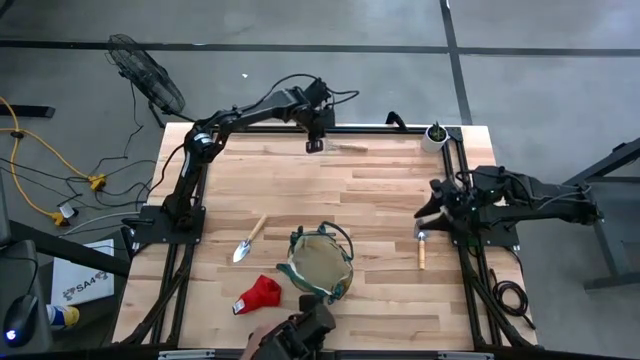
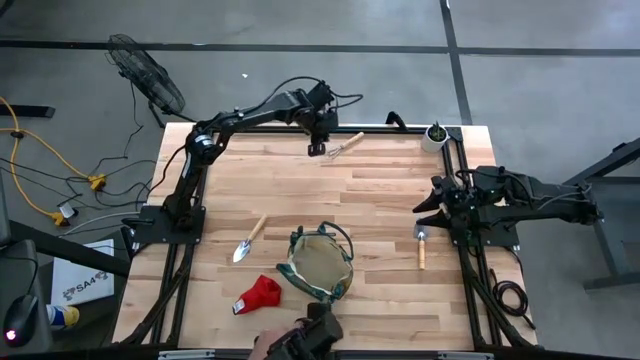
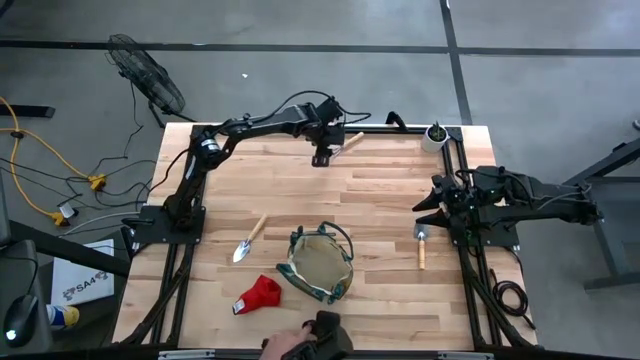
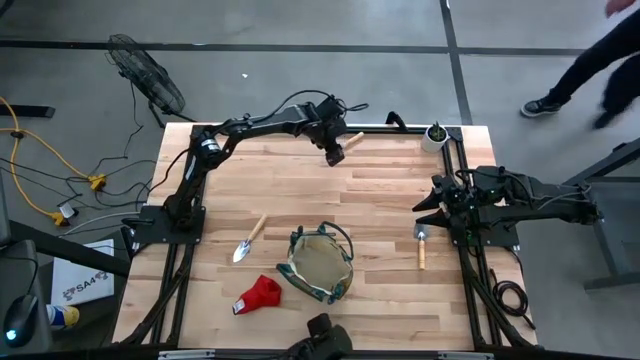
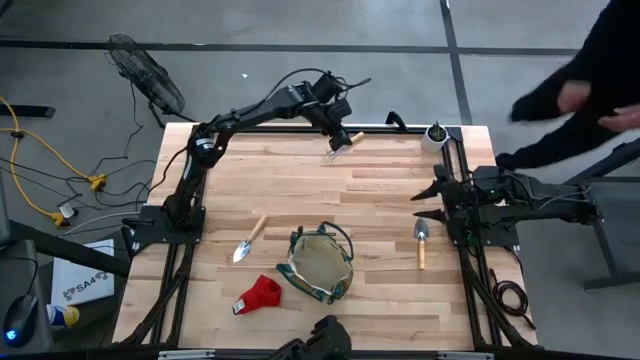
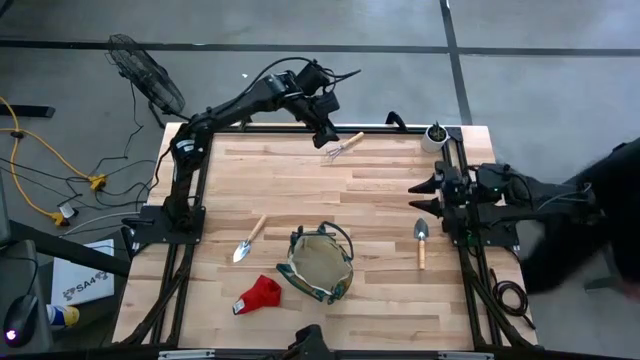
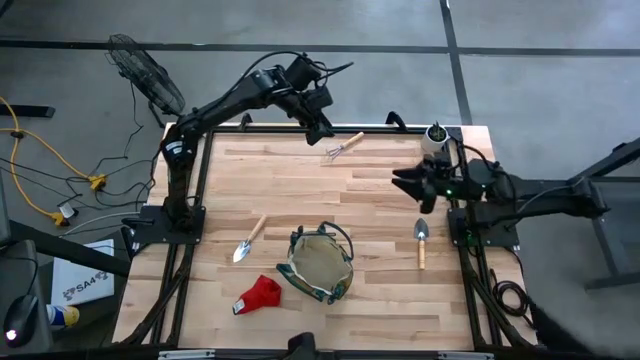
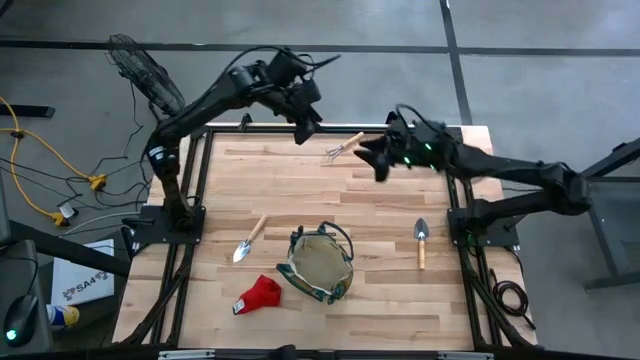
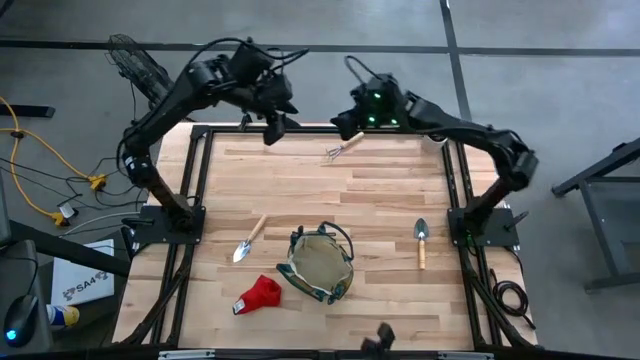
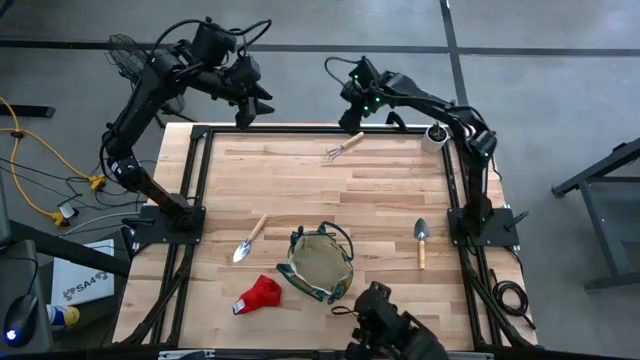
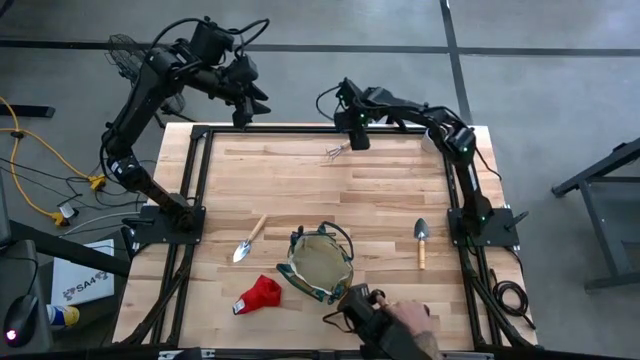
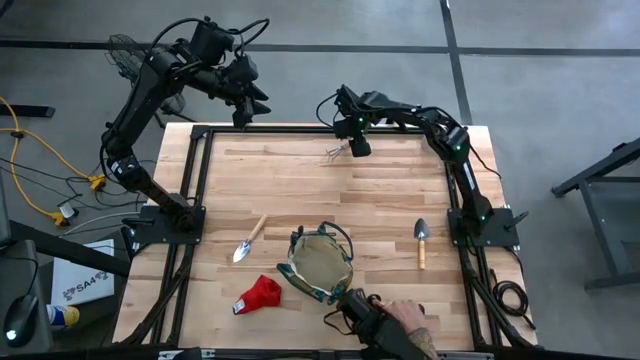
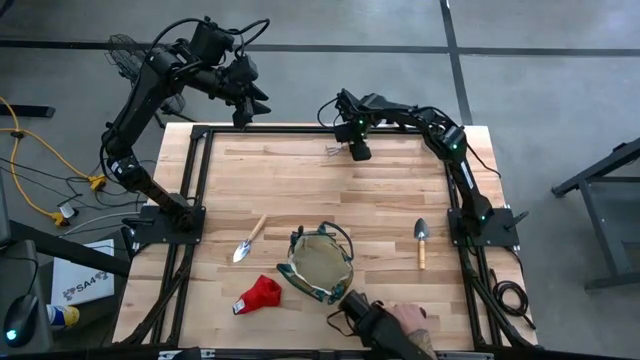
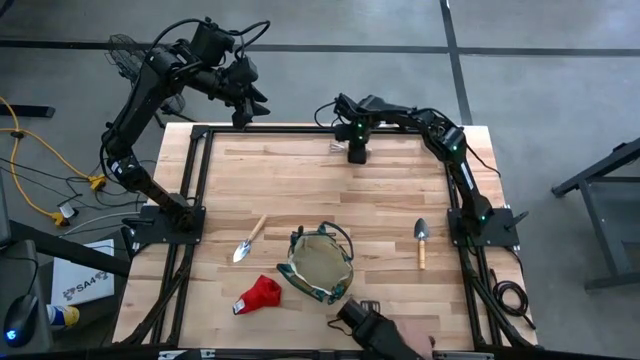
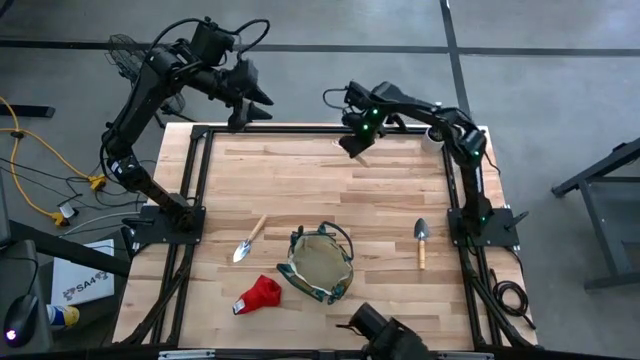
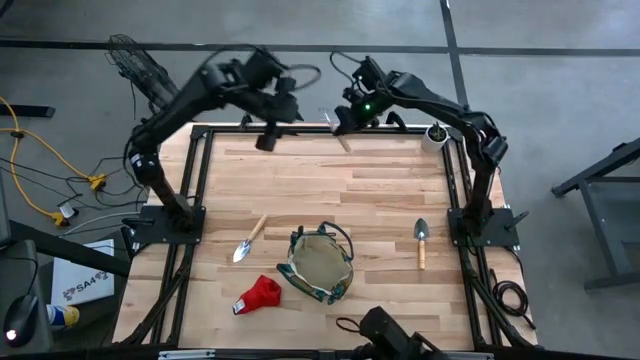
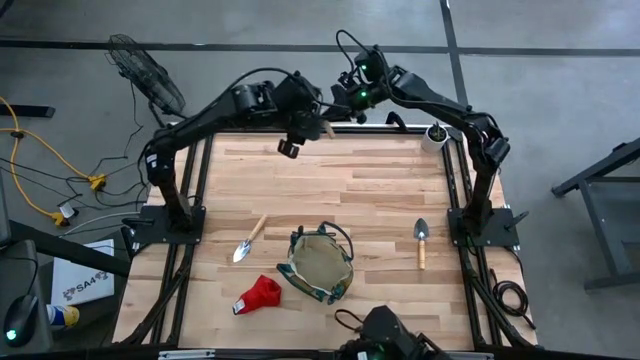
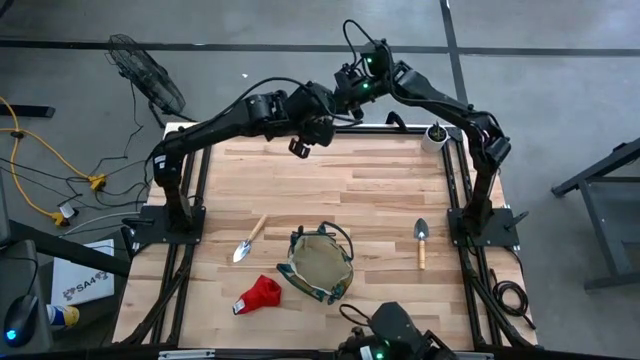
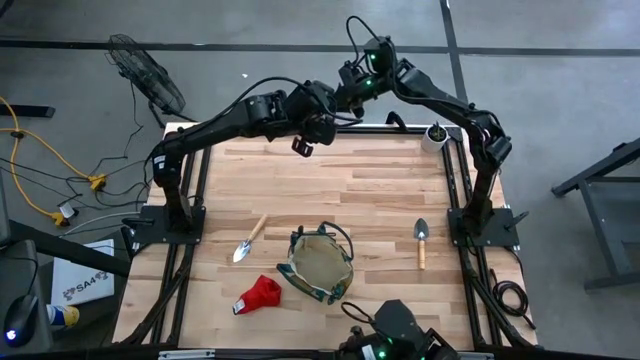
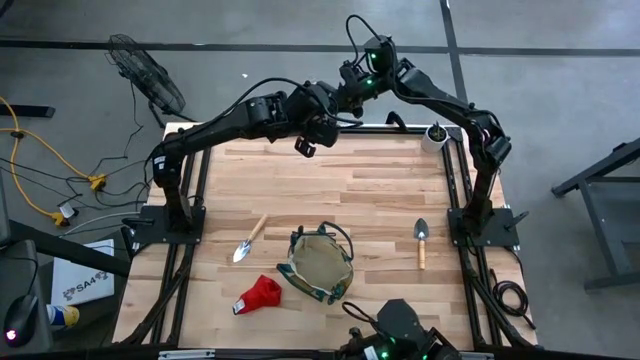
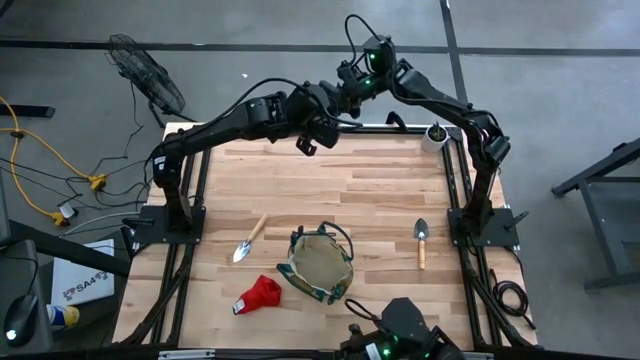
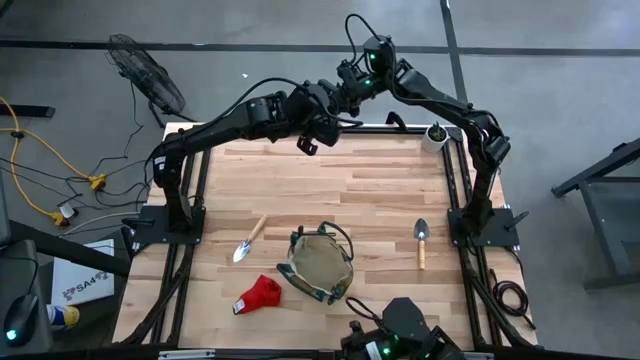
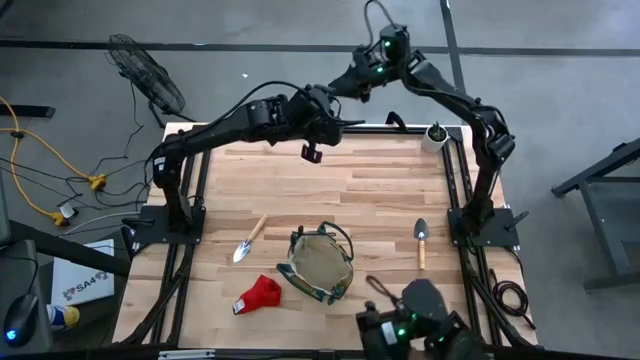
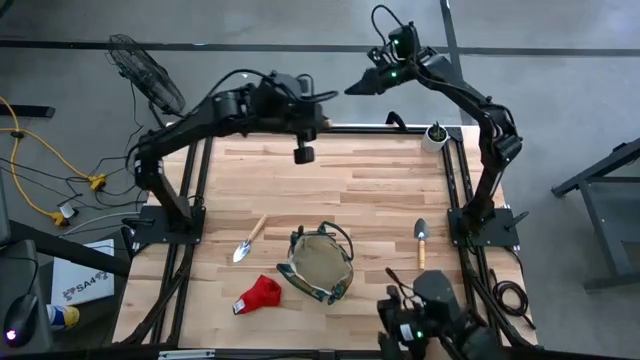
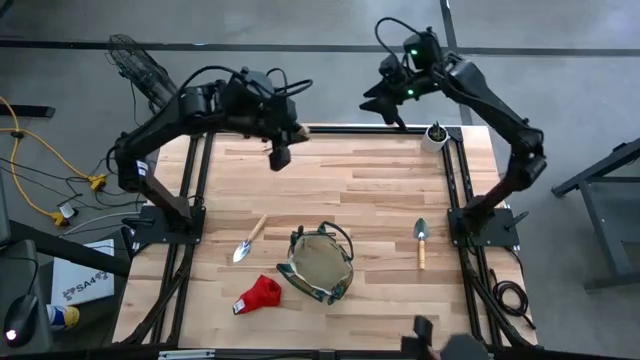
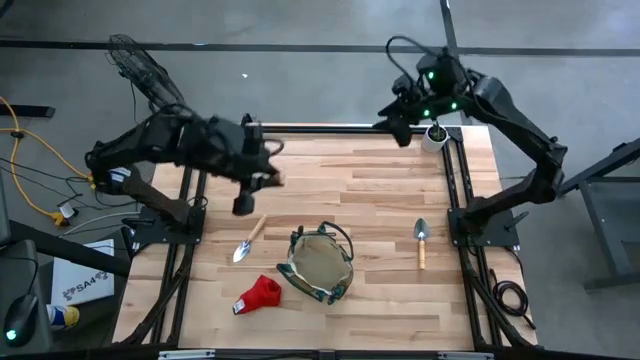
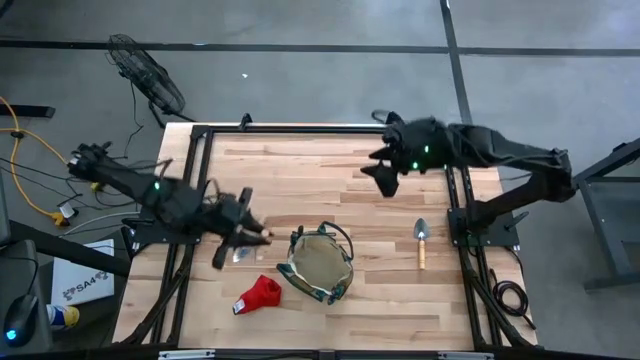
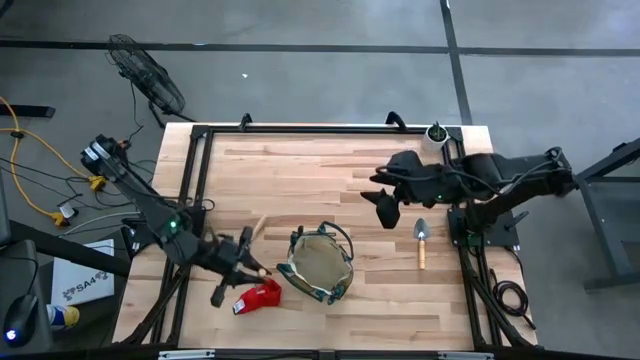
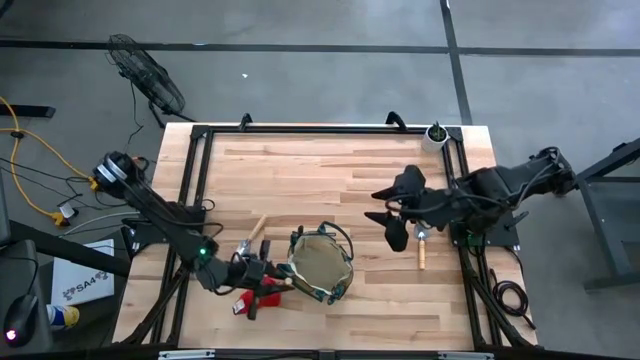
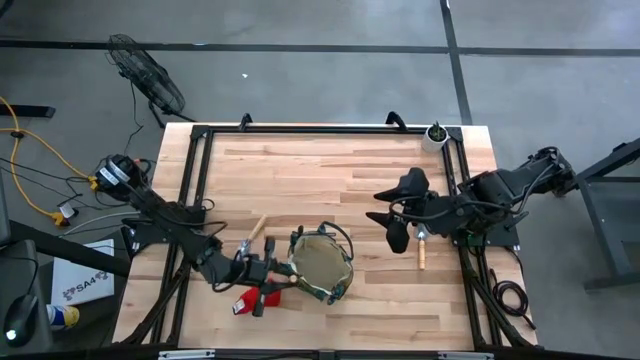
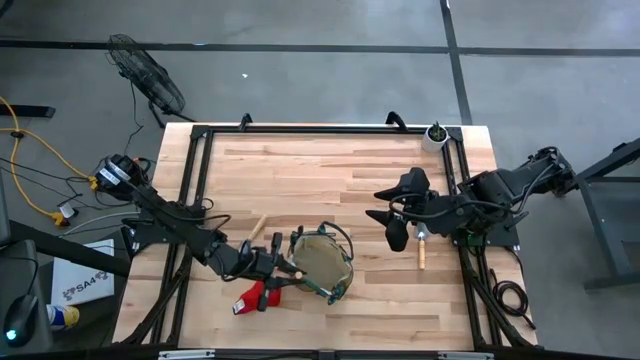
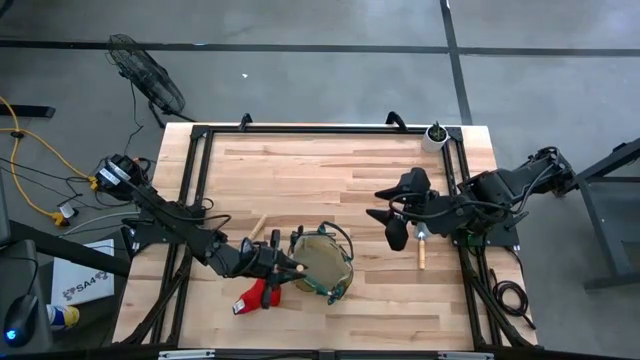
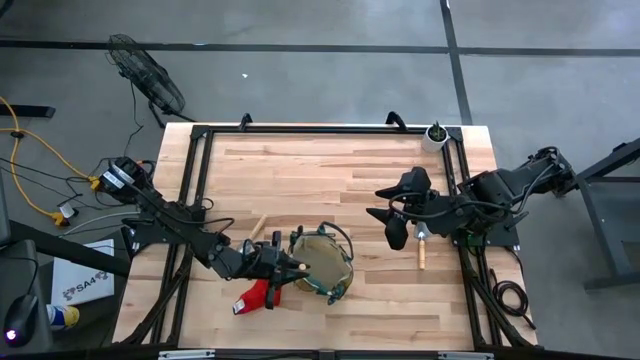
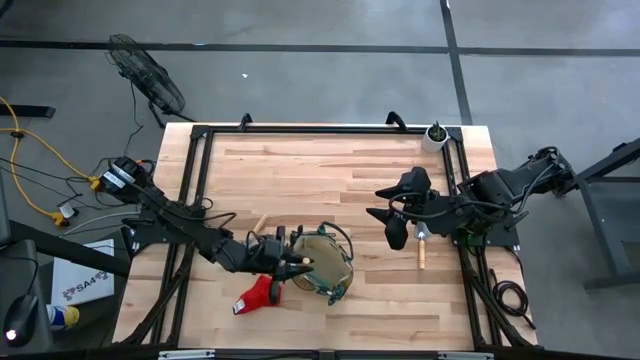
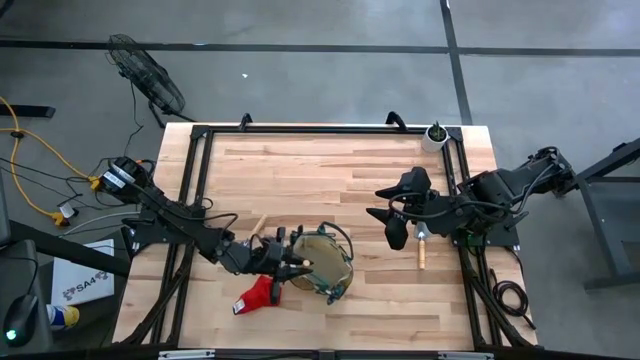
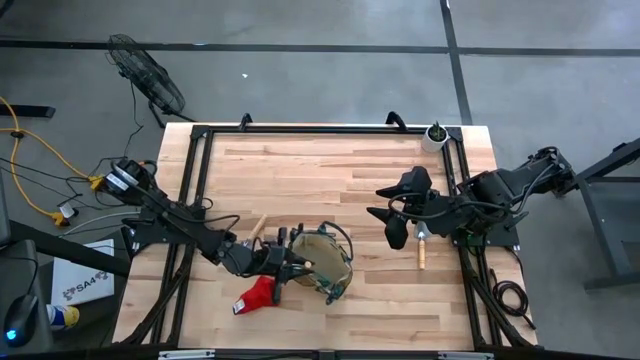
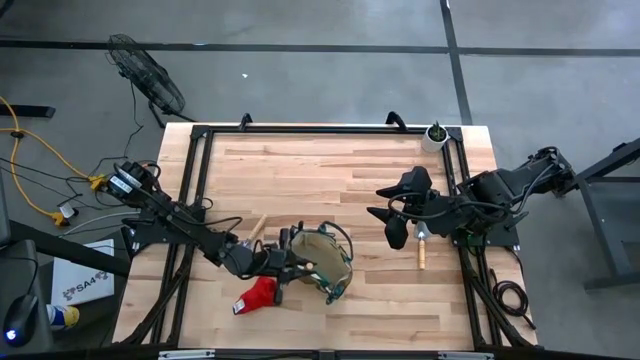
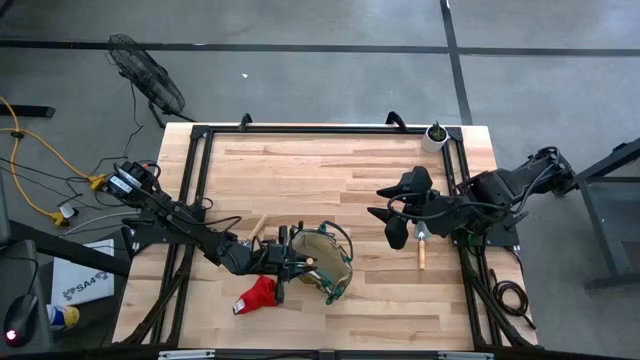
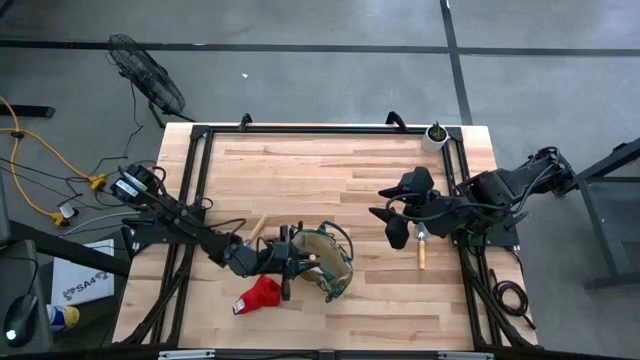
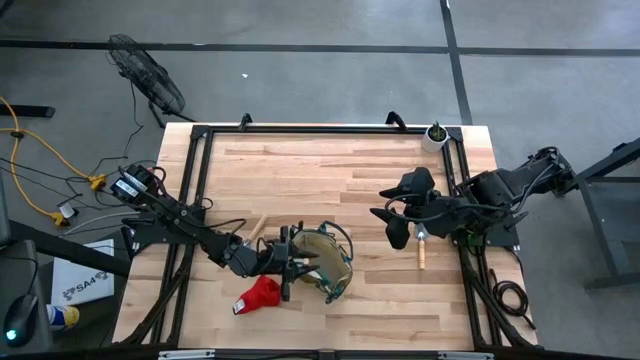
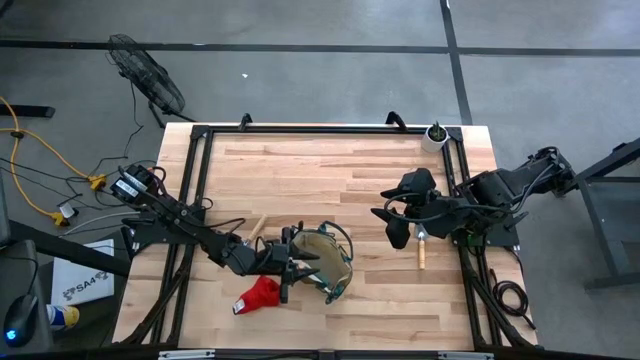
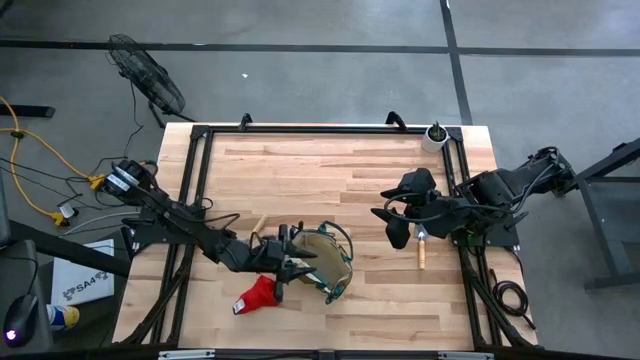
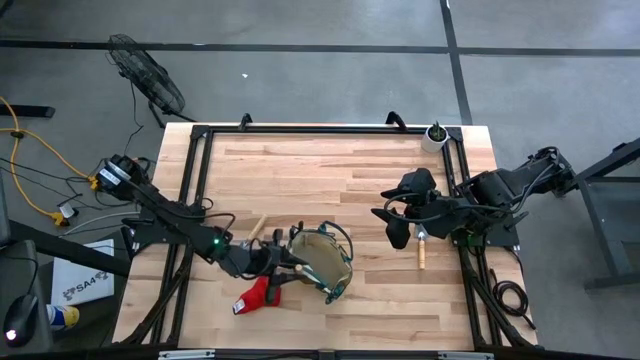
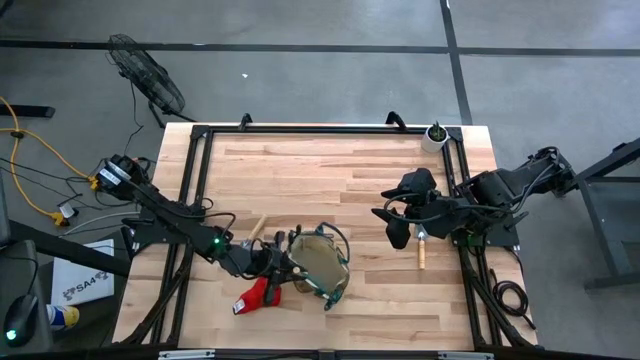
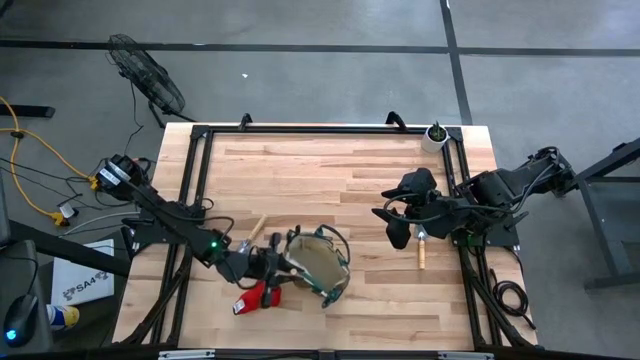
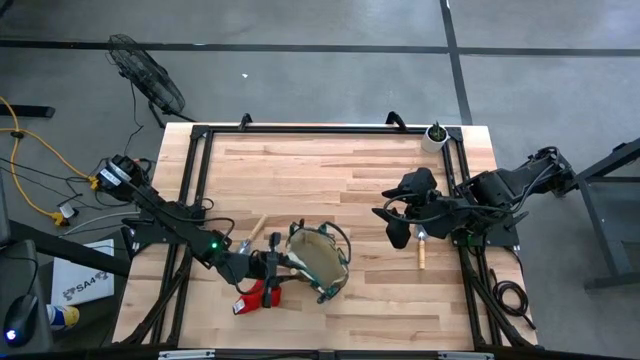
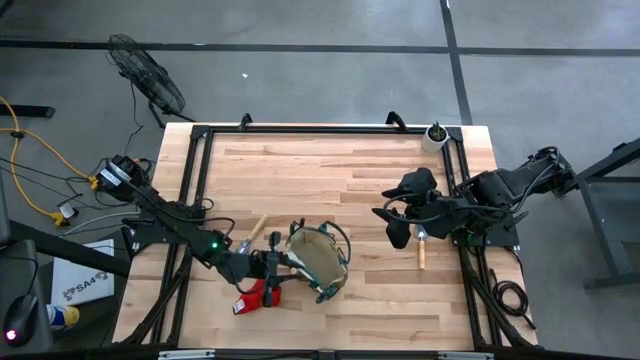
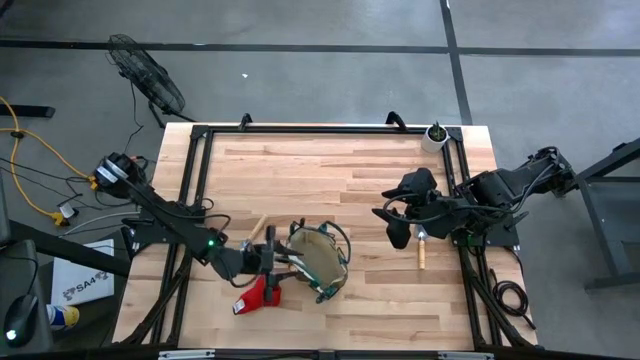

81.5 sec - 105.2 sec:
Task: Pick & Place Garden tools in Gardening bag
Put the brown hand rake into the light brown gardening bag
